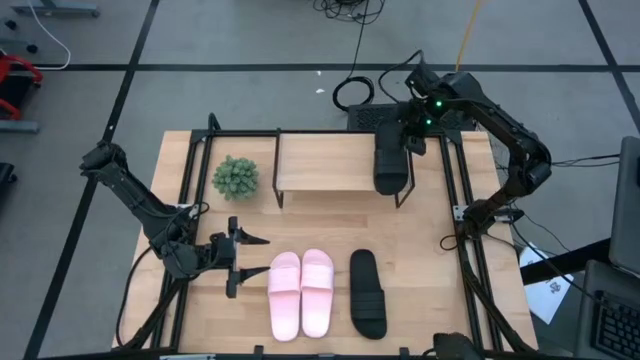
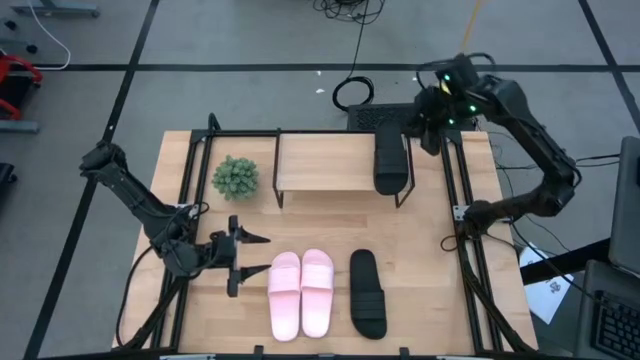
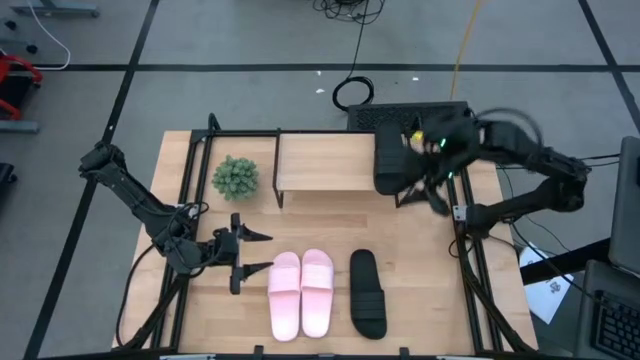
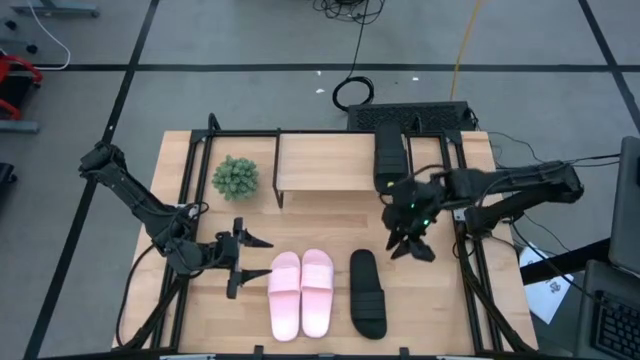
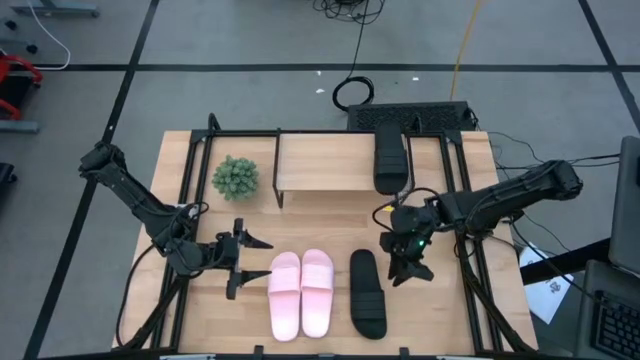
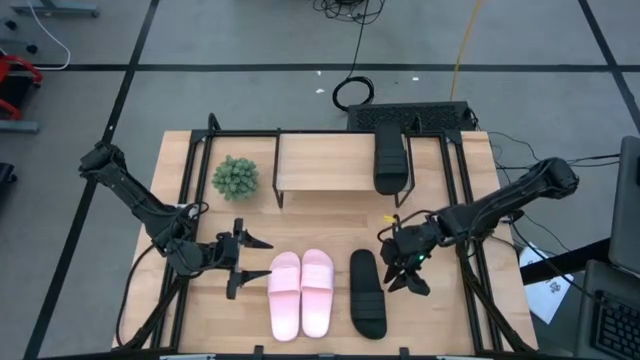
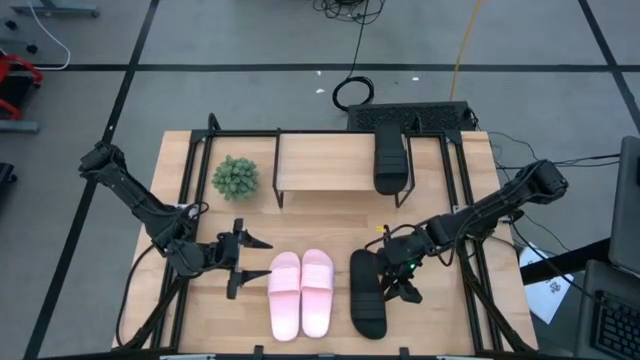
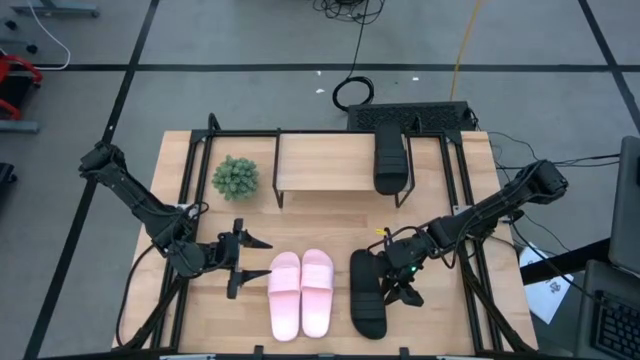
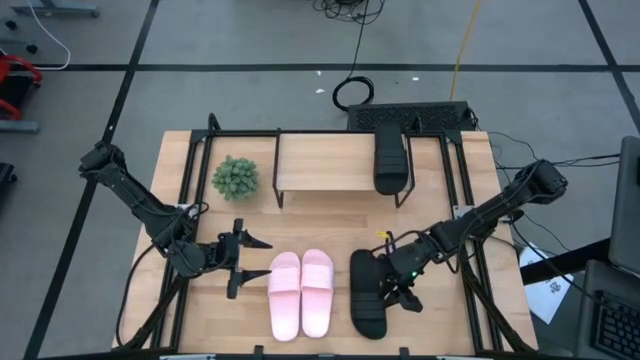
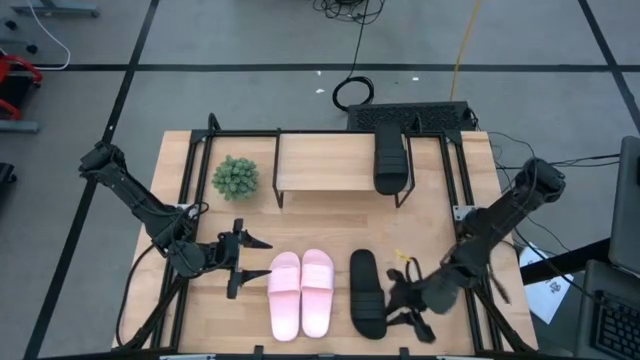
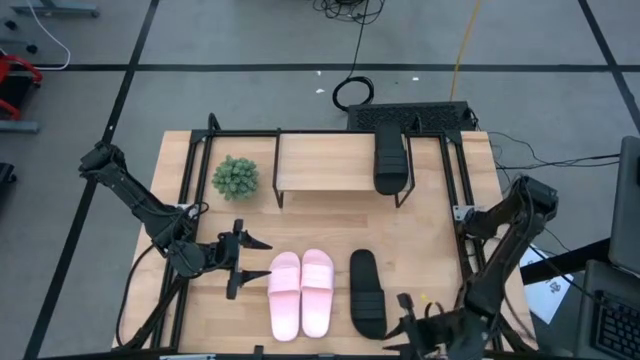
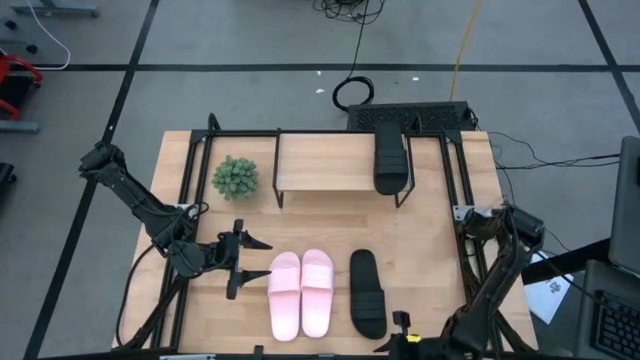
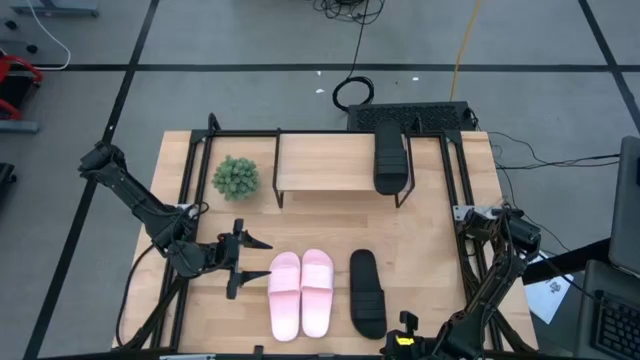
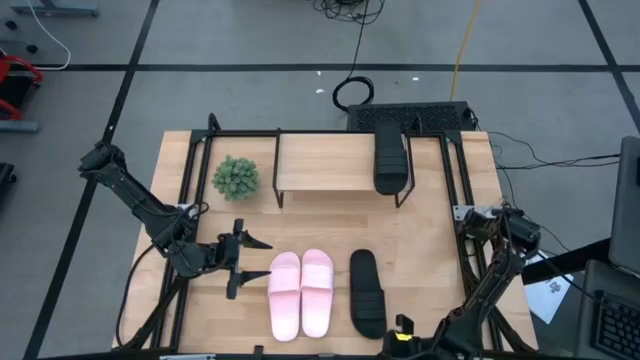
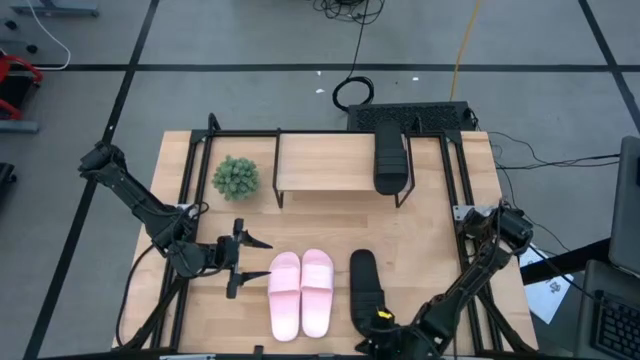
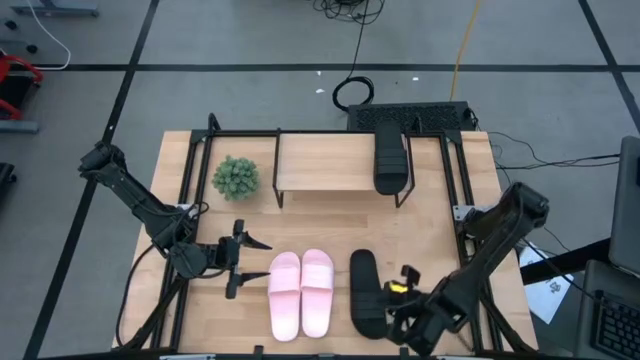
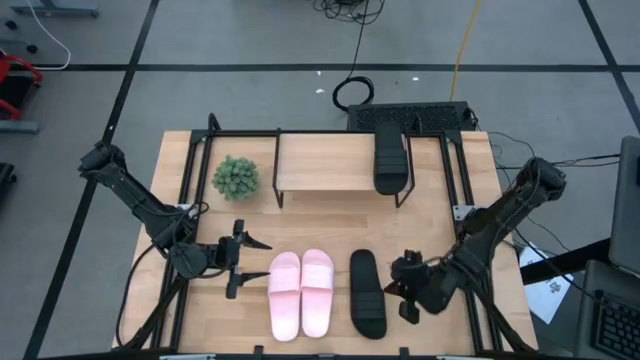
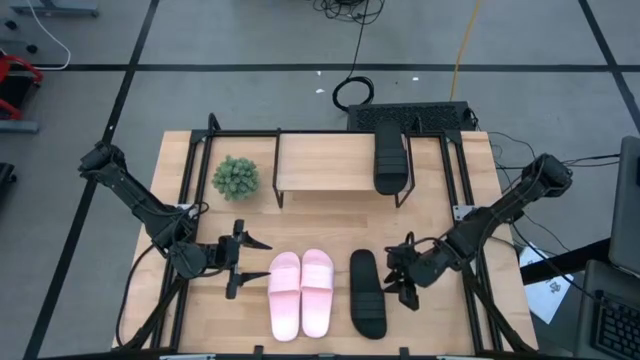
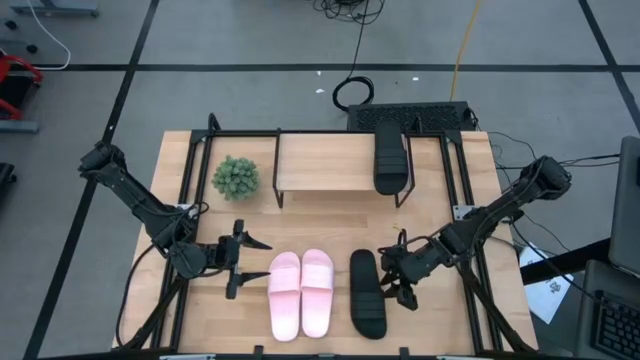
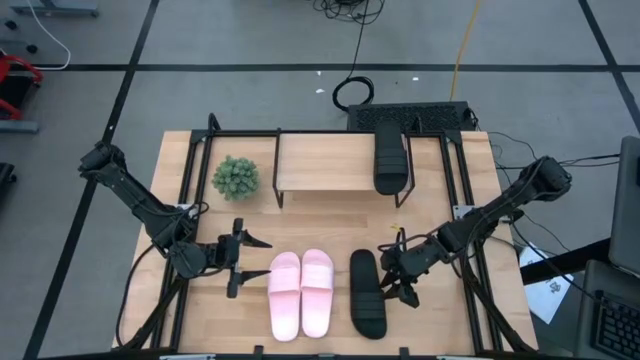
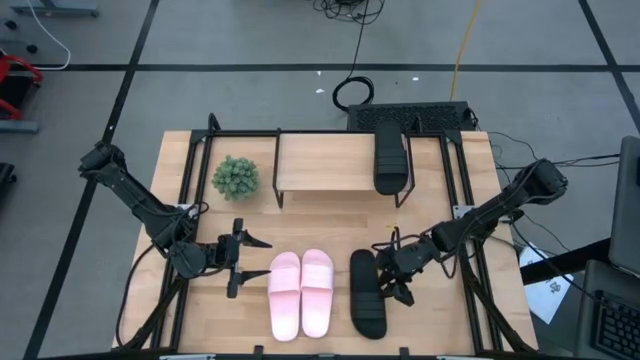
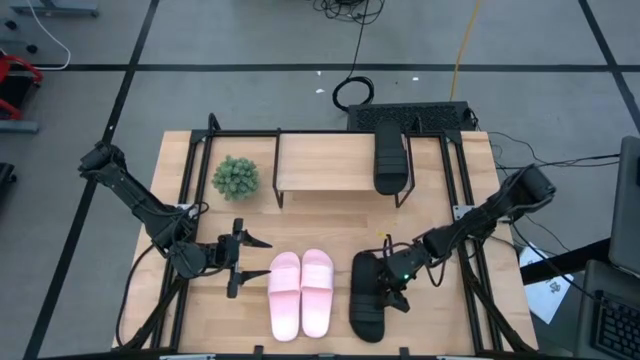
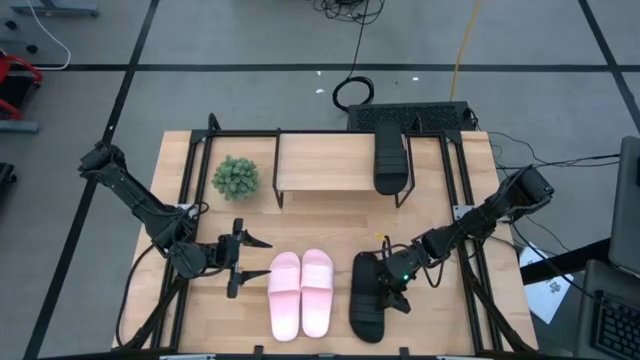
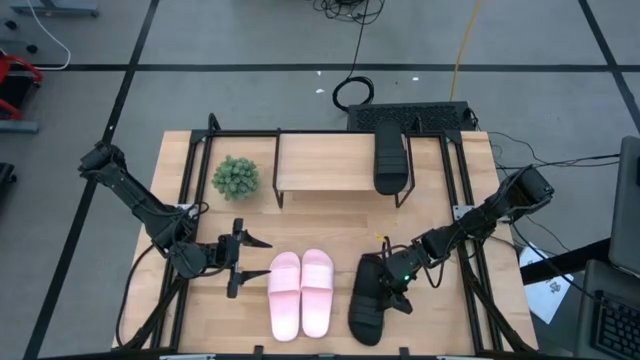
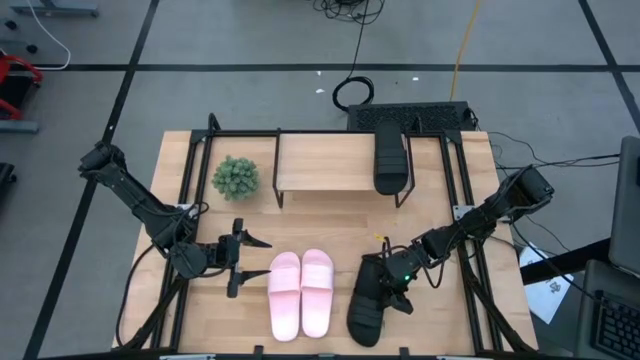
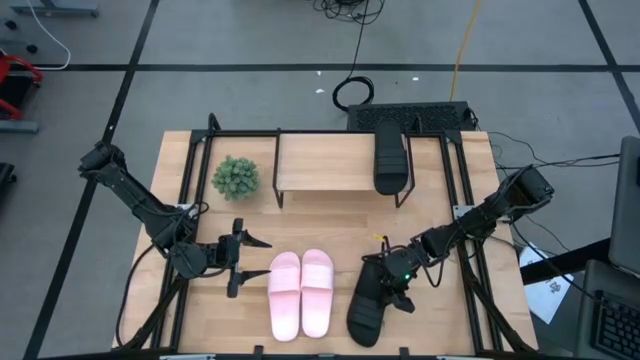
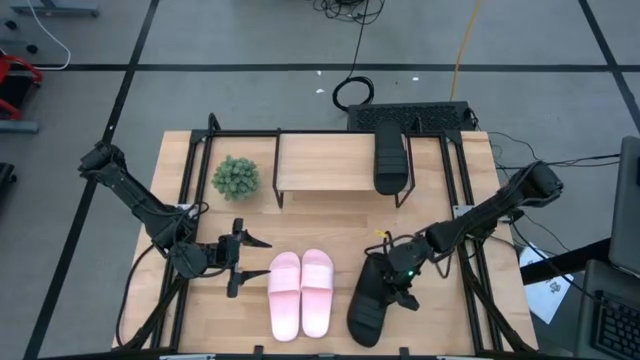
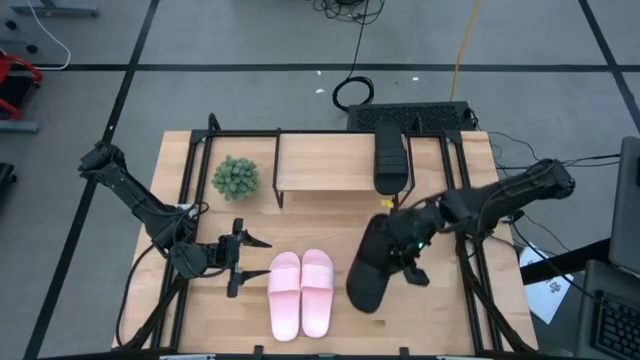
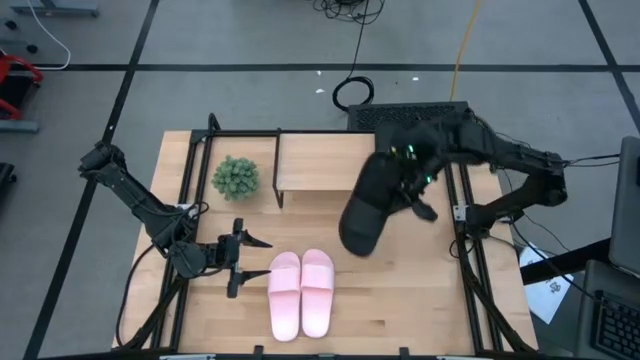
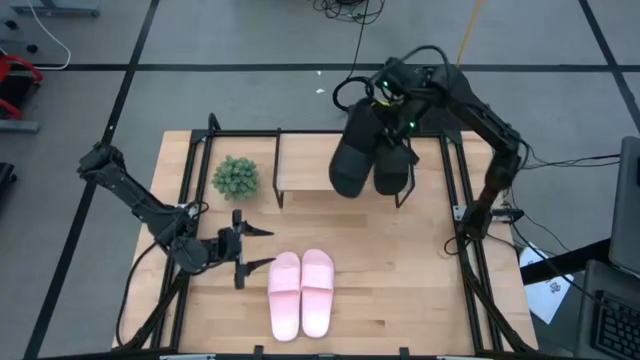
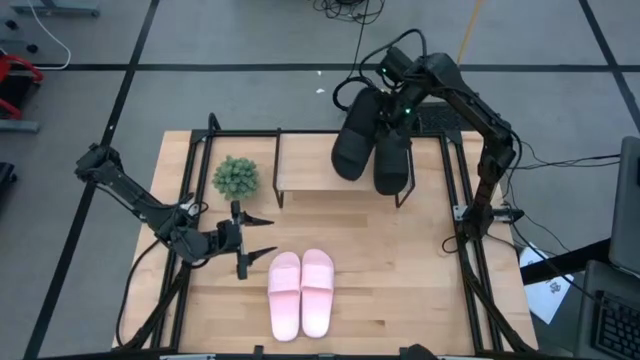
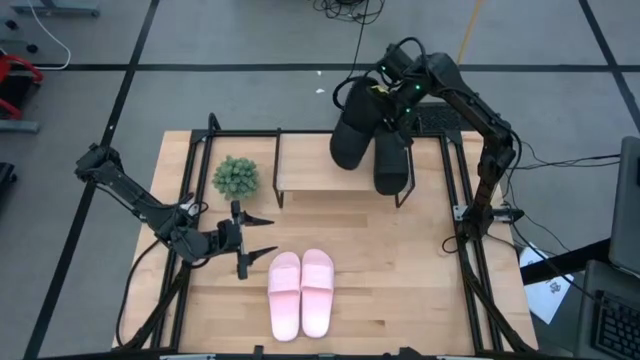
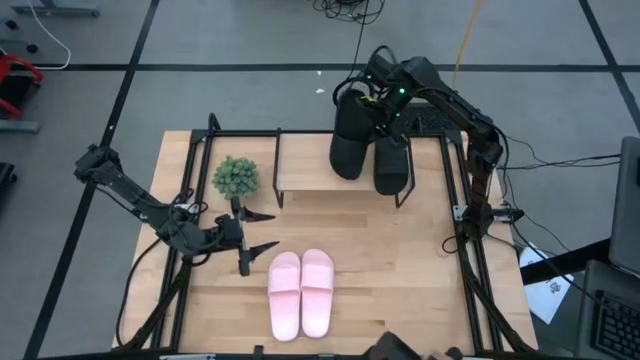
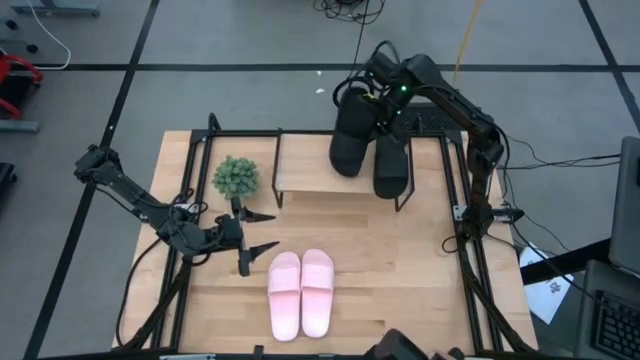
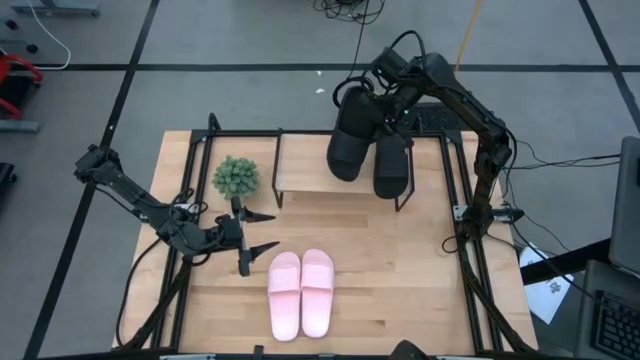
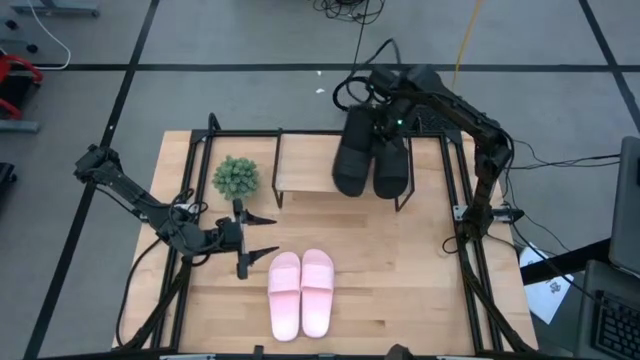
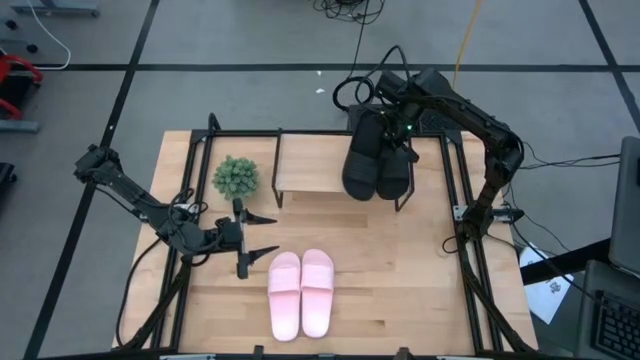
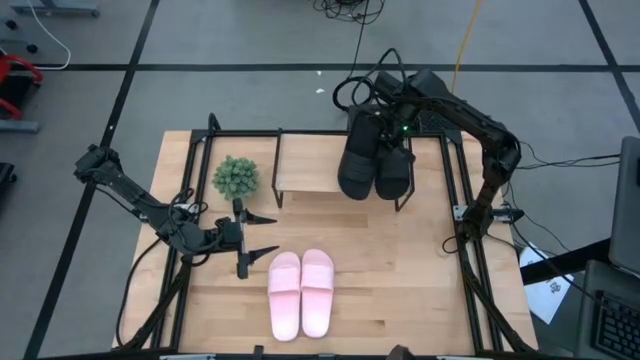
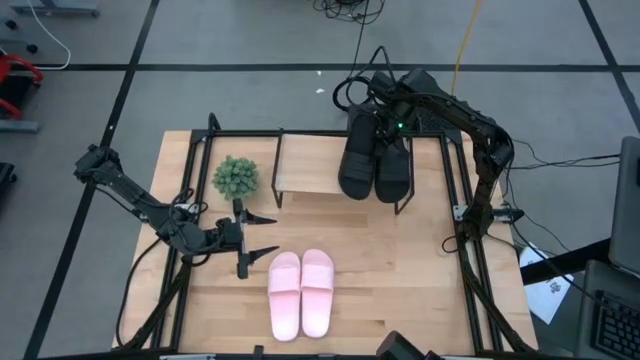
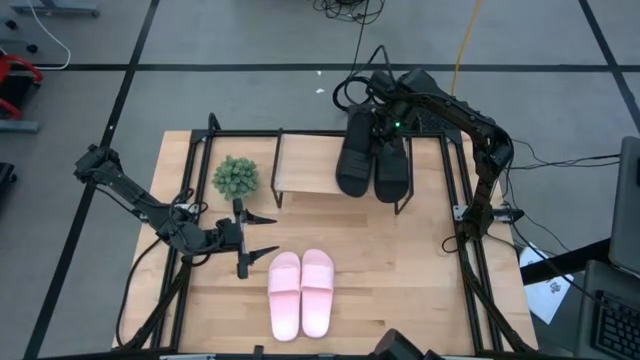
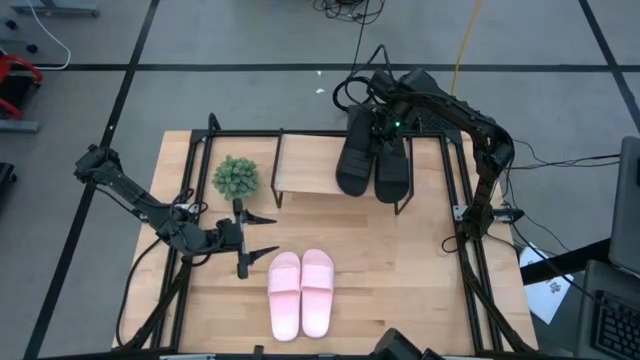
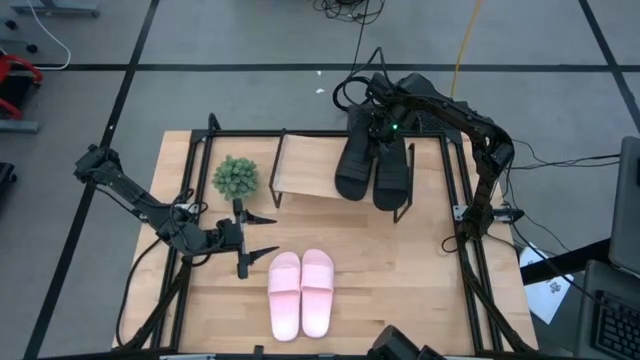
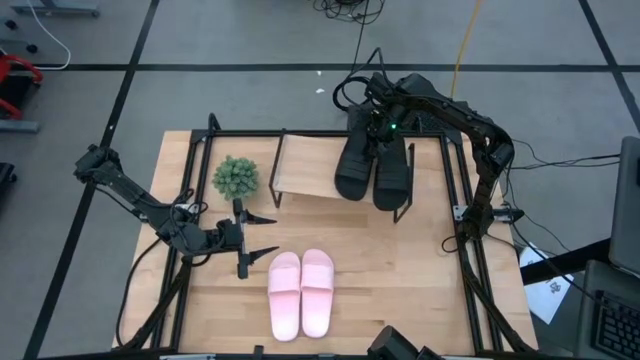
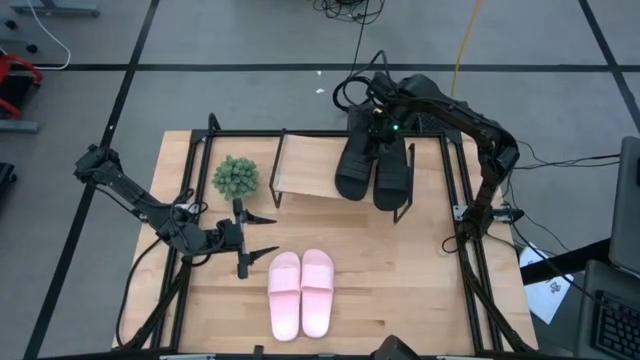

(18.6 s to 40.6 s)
Task: Pick and place slides into the shelf
Put the black slipper on the shelf
